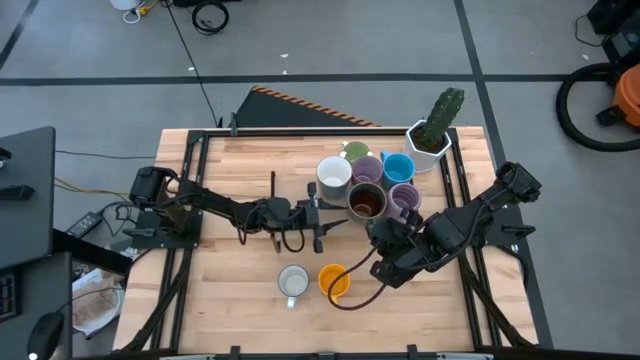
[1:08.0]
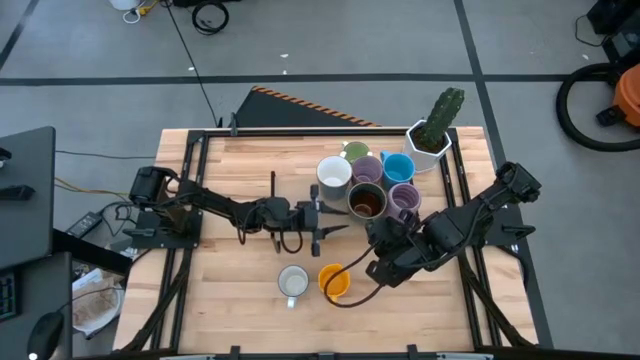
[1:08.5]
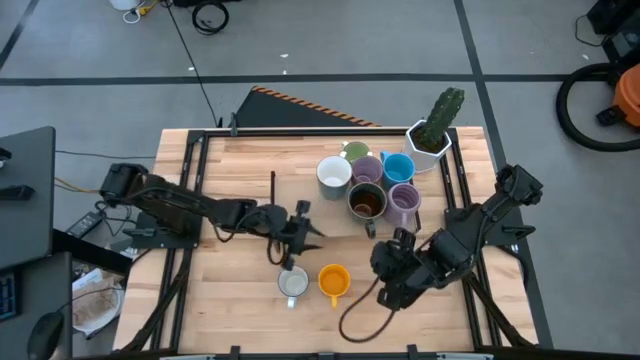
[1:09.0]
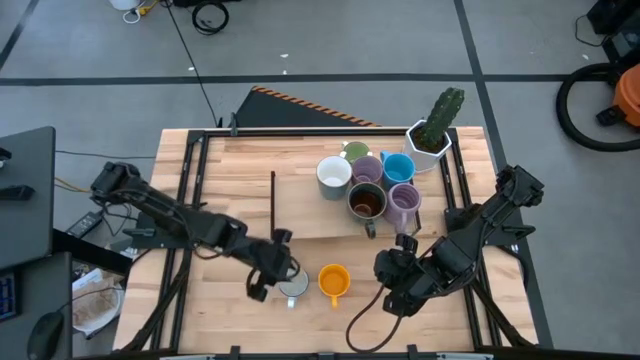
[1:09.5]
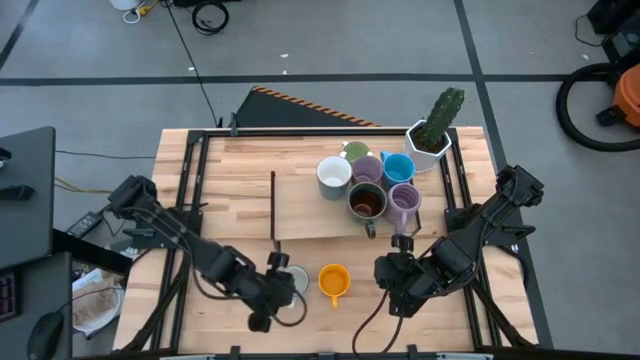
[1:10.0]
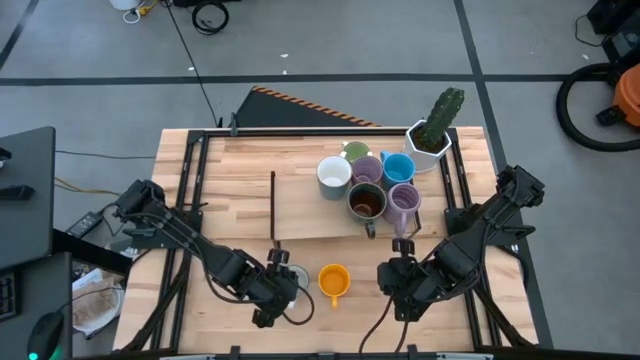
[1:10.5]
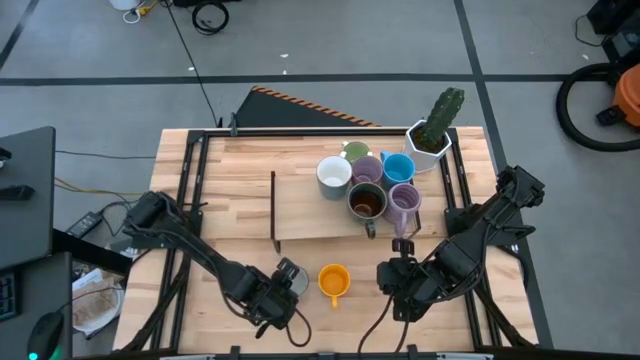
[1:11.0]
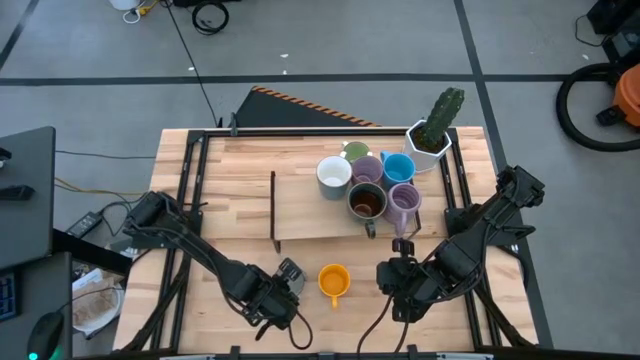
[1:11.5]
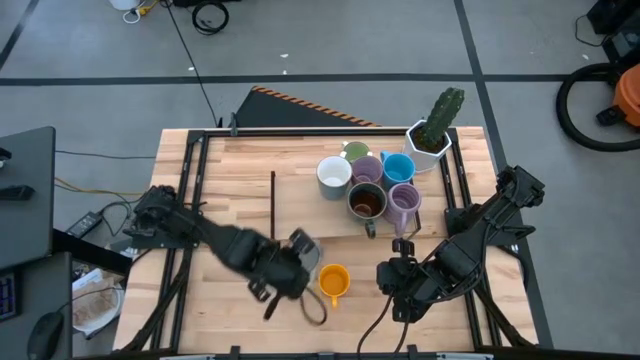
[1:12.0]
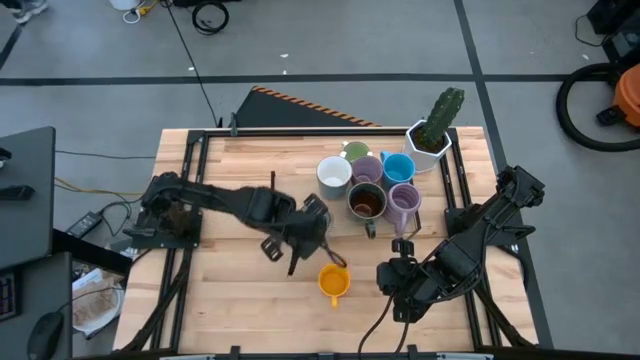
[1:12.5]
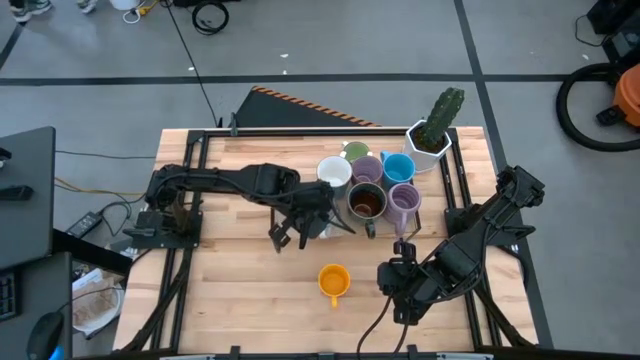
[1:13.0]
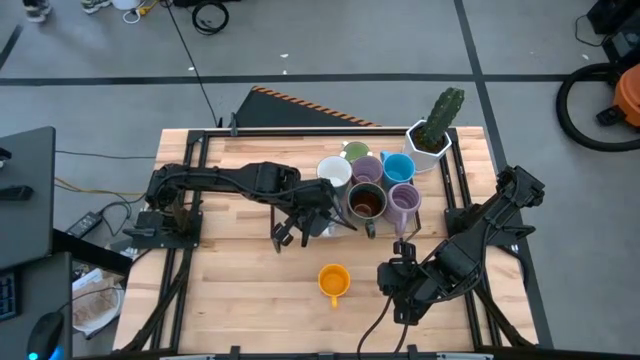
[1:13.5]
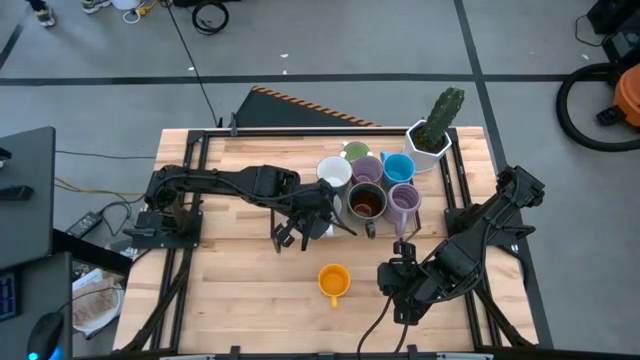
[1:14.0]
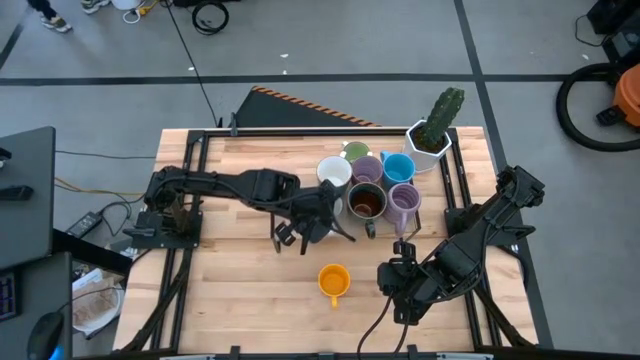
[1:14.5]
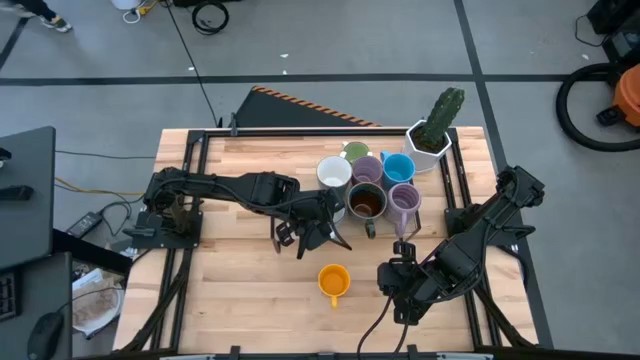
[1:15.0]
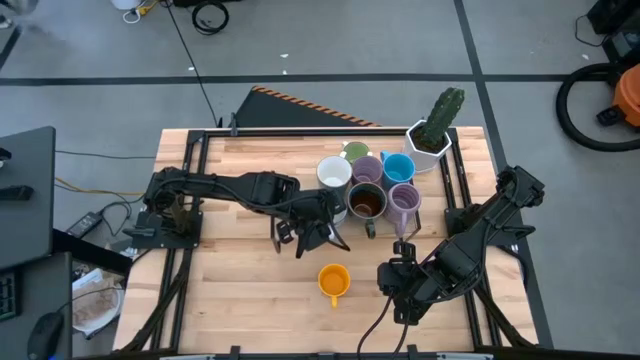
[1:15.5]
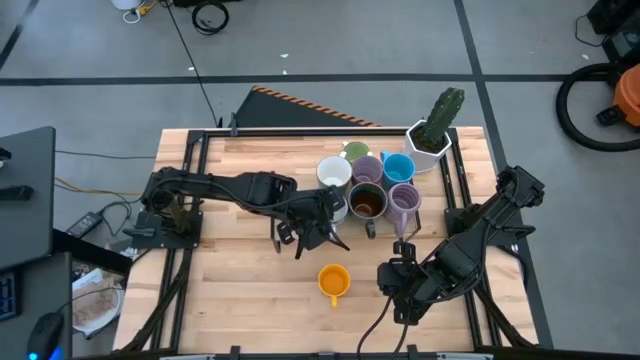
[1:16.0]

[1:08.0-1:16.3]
Task: Place coffee mugs
Put the white-blue mug on the shelf

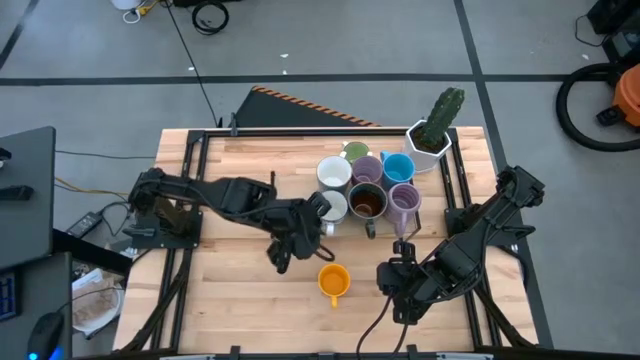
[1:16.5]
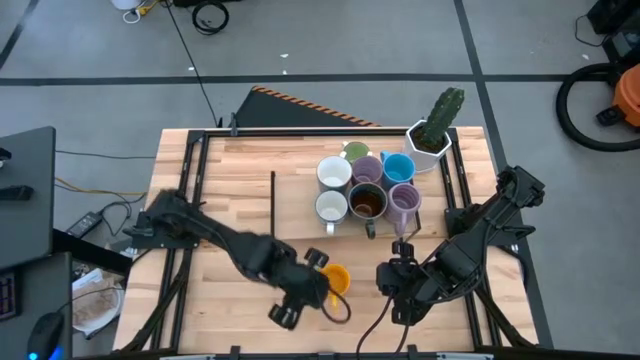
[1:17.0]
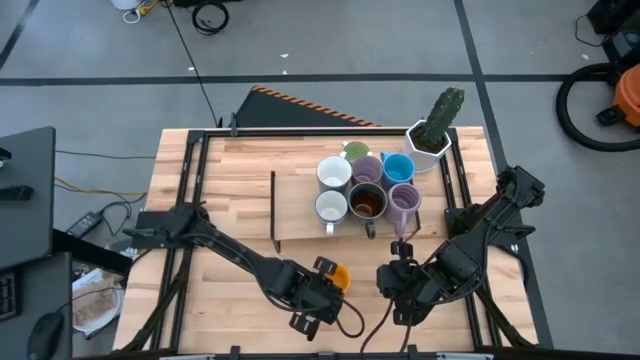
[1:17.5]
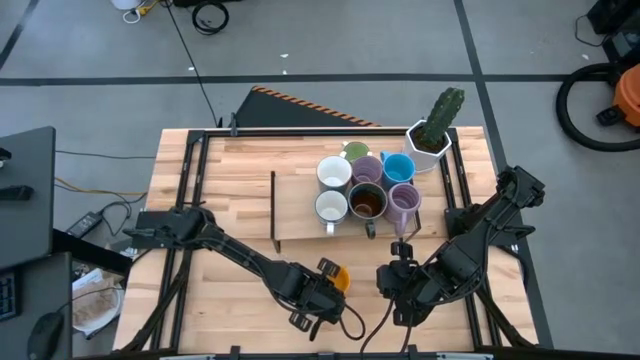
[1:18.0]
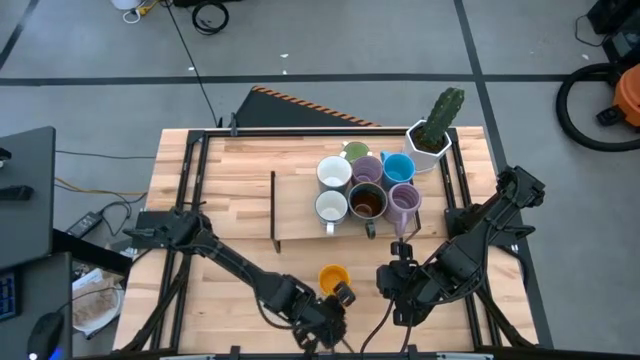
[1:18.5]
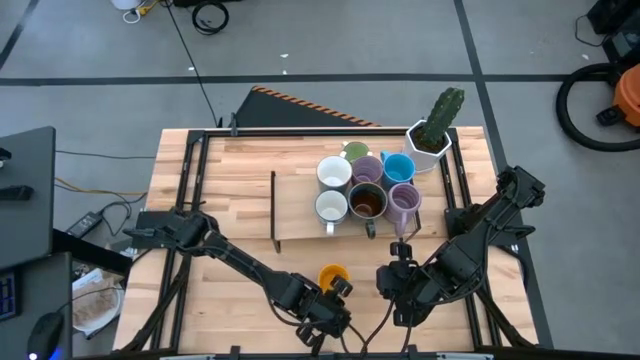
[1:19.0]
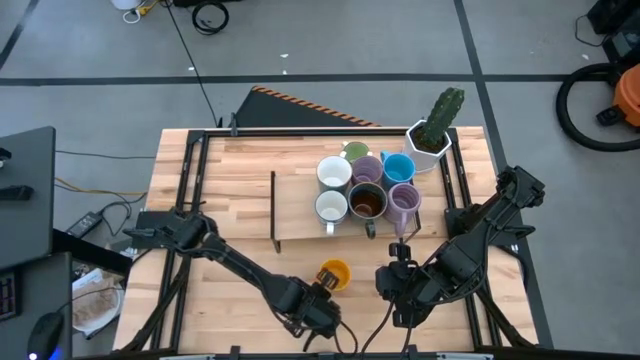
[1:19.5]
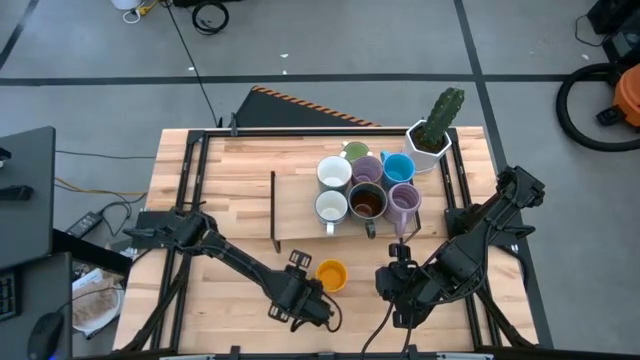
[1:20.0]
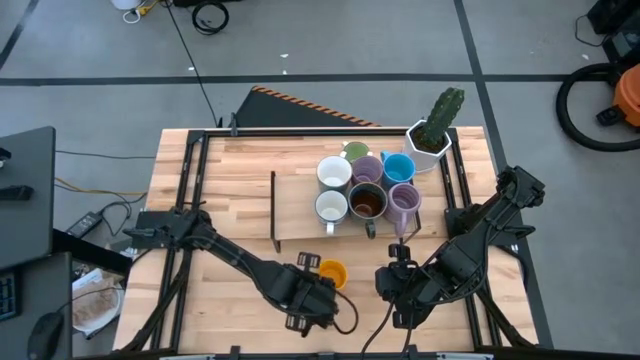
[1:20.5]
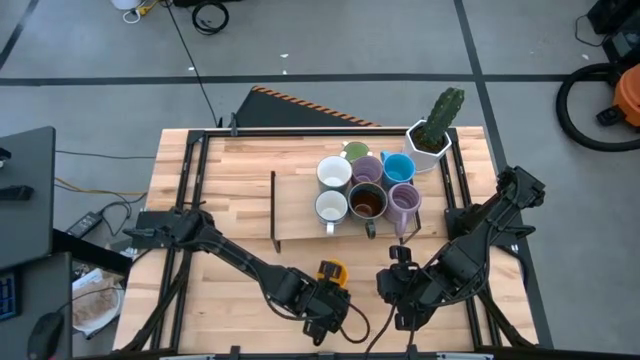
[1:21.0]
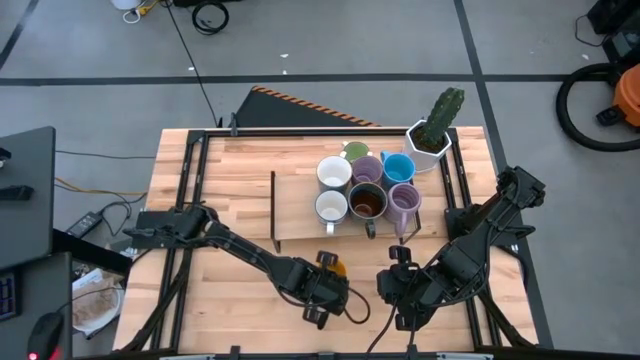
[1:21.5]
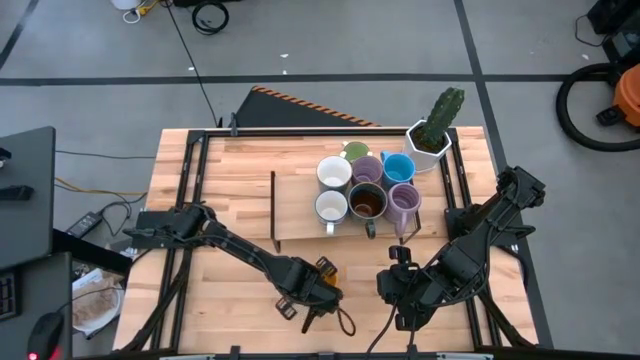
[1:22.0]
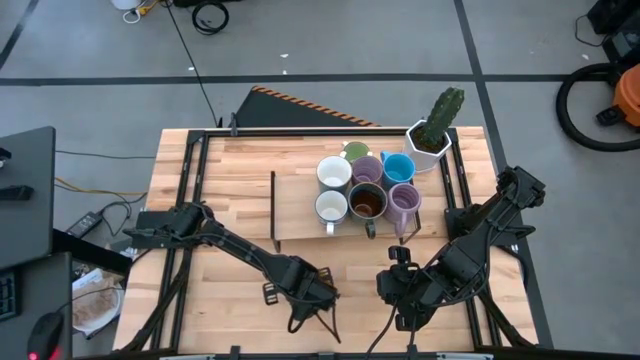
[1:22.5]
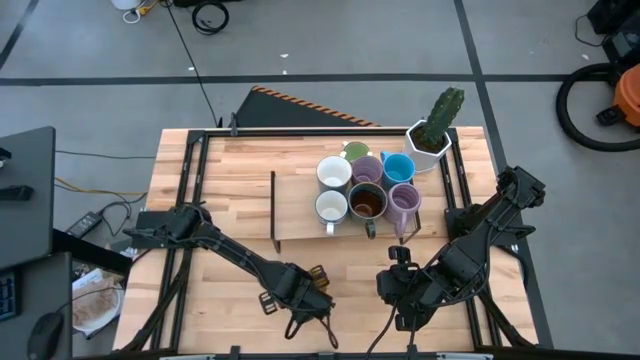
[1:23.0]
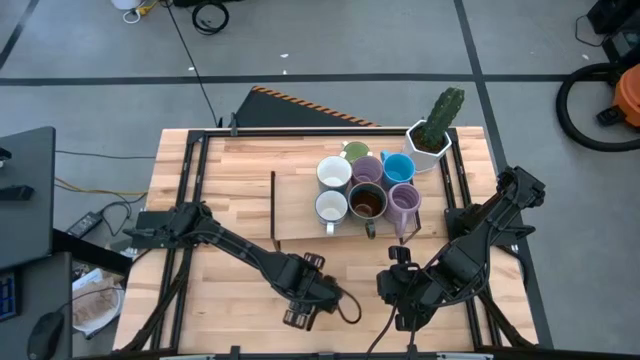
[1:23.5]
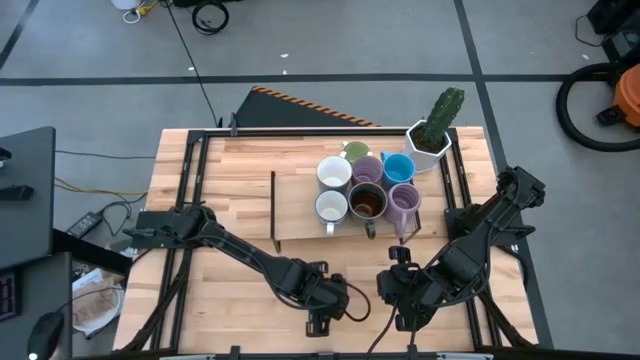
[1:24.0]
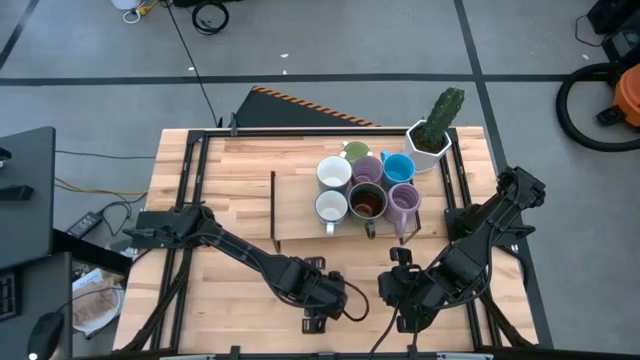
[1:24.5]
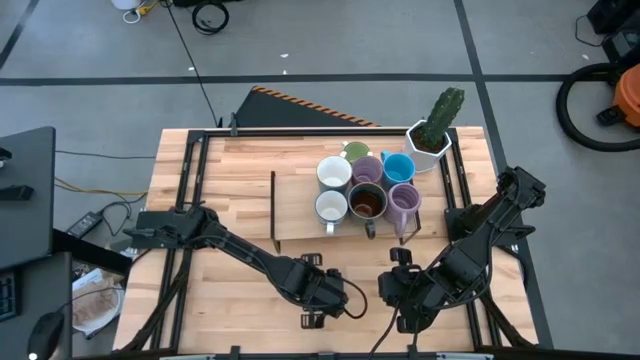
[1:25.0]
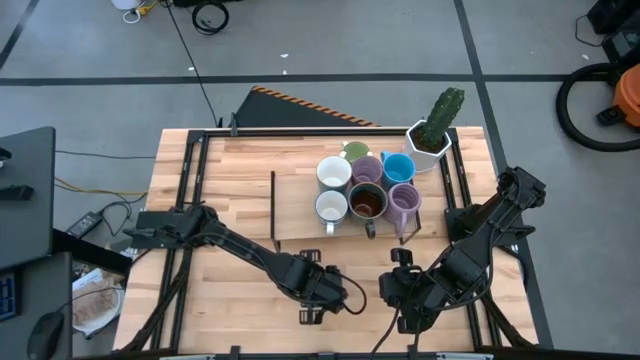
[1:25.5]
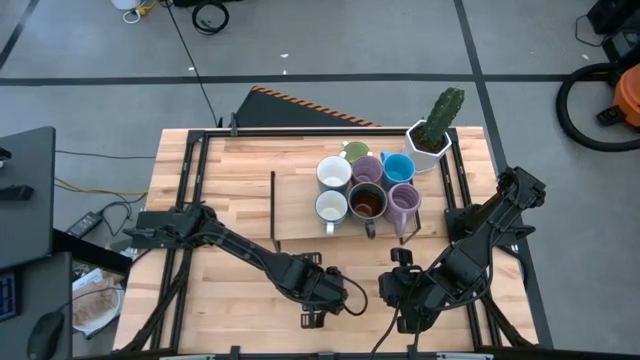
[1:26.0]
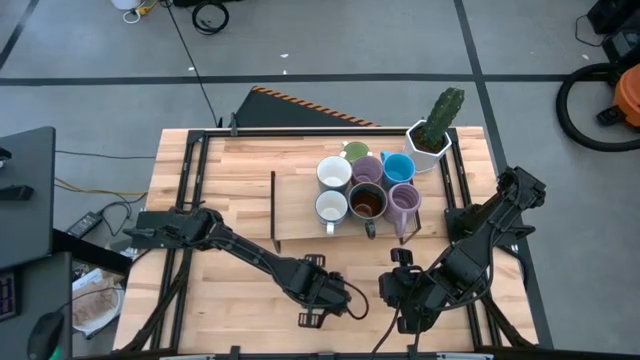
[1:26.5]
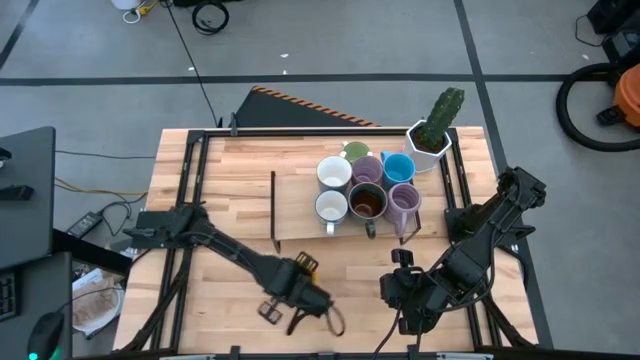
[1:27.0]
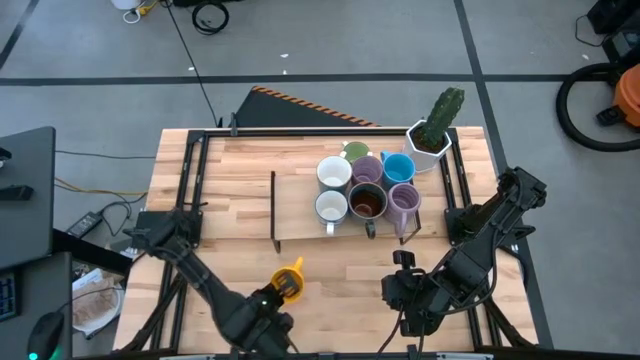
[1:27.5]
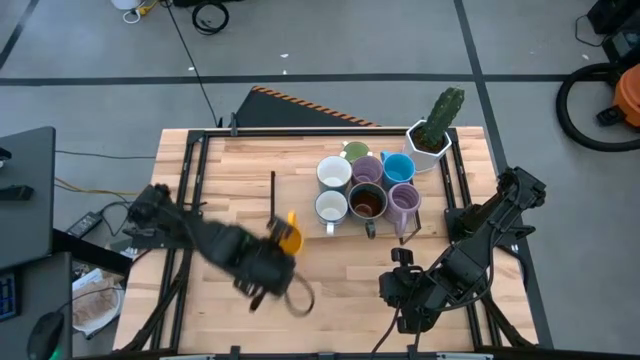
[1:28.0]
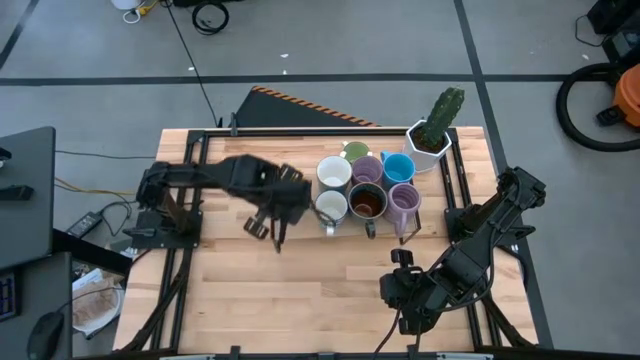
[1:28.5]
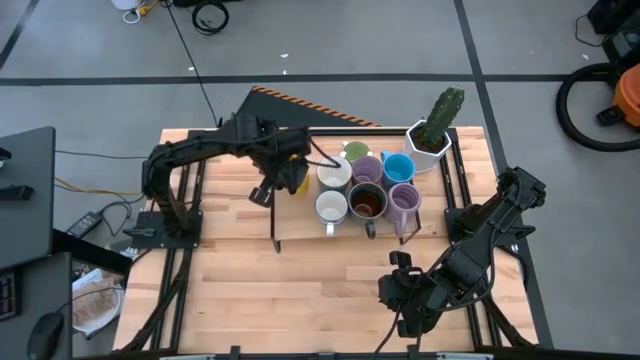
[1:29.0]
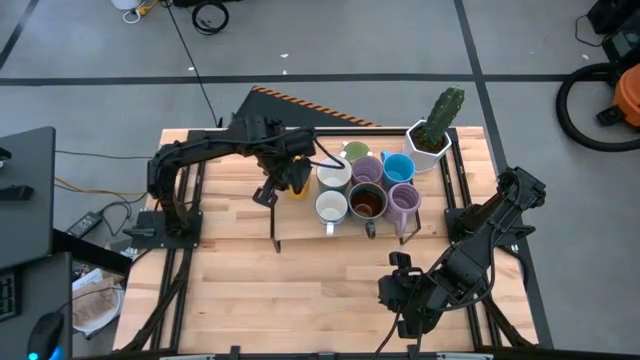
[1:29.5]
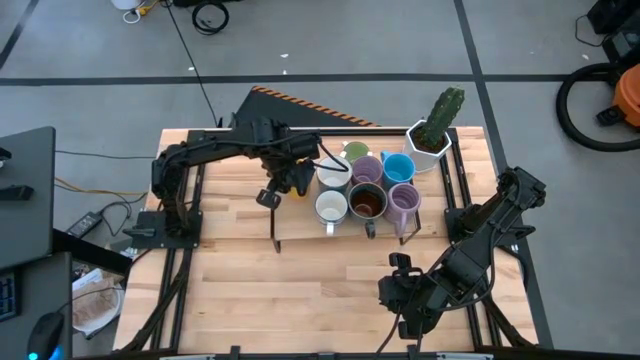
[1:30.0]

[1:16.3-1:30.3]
Put the orange mug on the shelf
